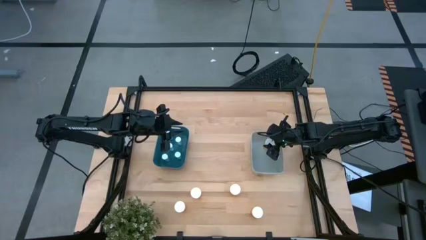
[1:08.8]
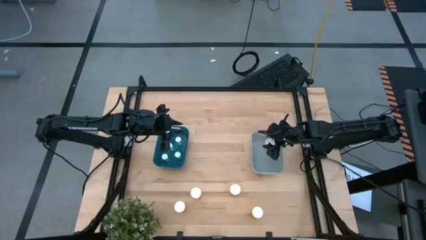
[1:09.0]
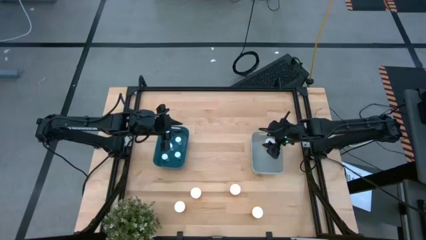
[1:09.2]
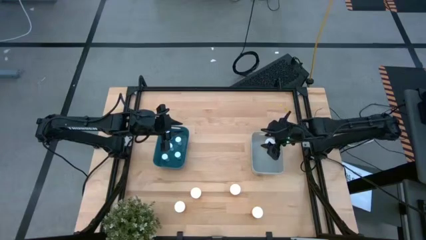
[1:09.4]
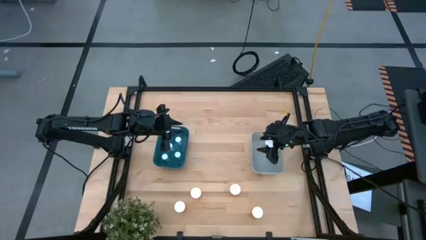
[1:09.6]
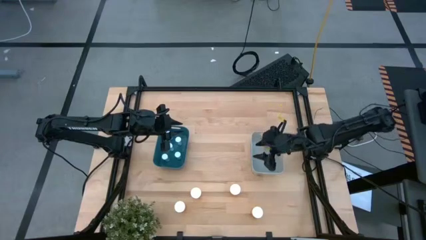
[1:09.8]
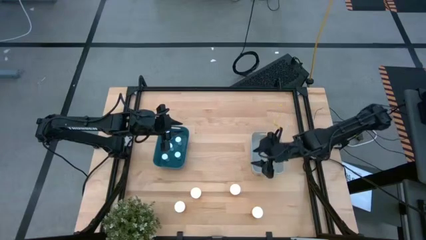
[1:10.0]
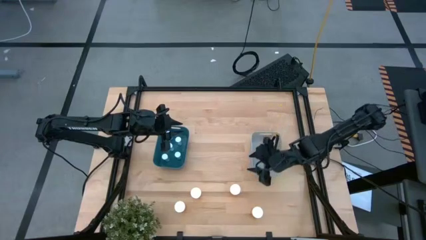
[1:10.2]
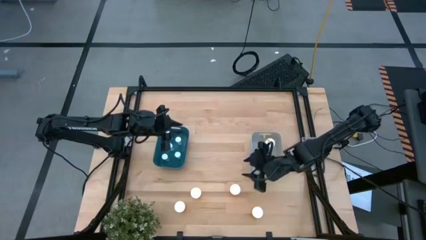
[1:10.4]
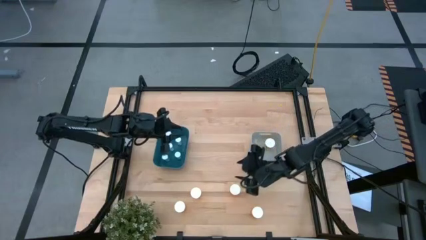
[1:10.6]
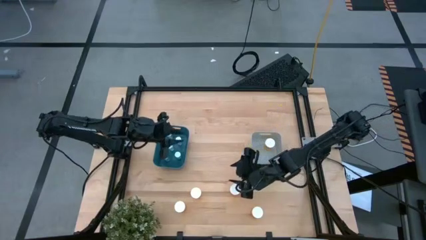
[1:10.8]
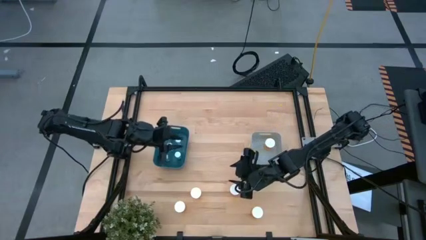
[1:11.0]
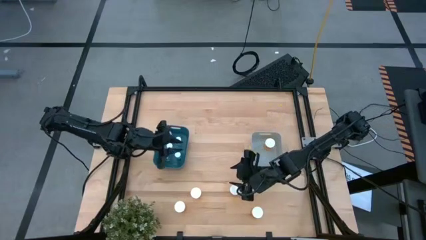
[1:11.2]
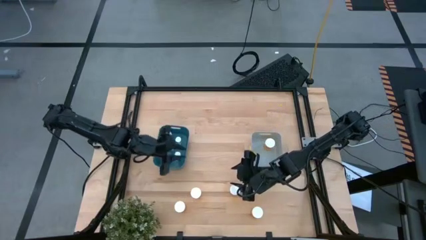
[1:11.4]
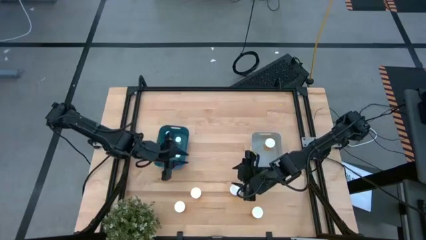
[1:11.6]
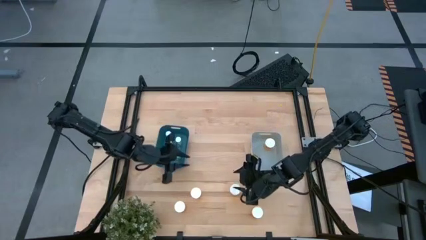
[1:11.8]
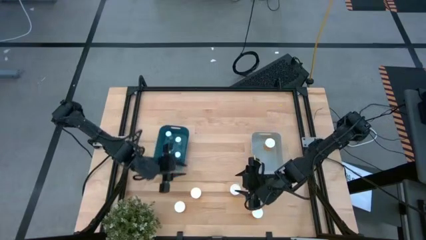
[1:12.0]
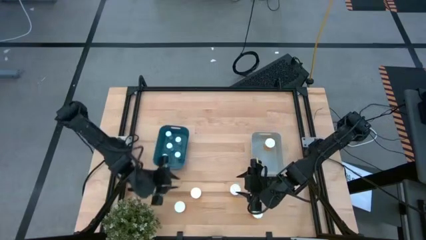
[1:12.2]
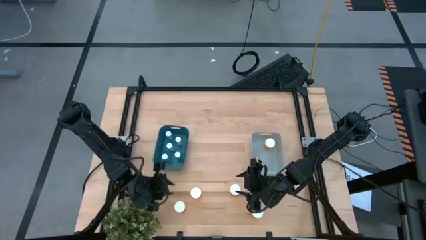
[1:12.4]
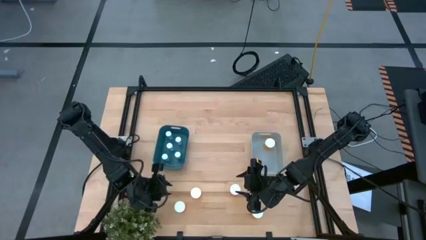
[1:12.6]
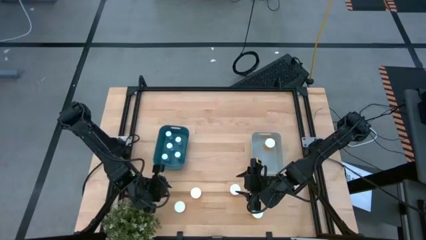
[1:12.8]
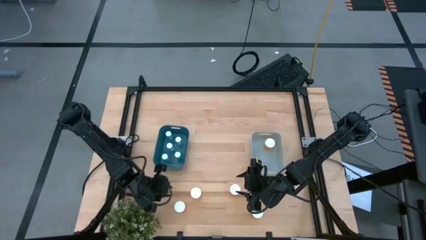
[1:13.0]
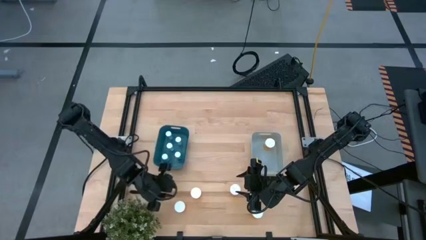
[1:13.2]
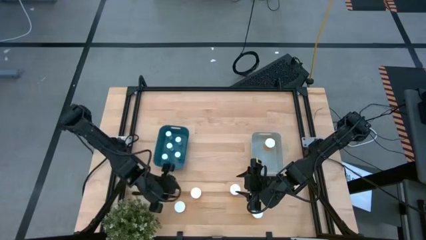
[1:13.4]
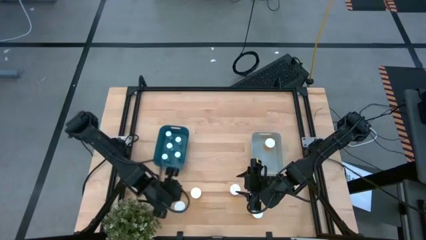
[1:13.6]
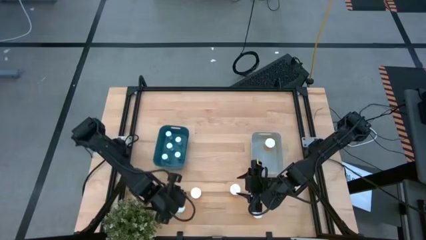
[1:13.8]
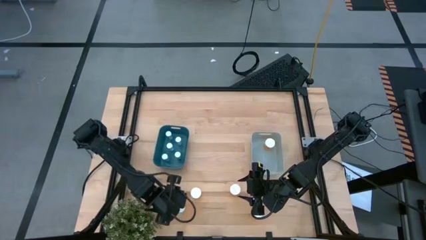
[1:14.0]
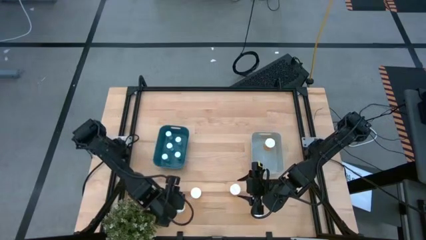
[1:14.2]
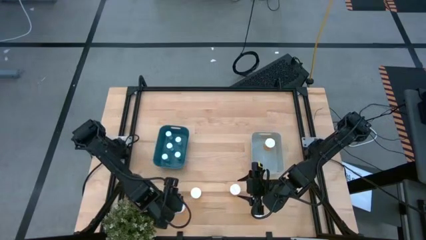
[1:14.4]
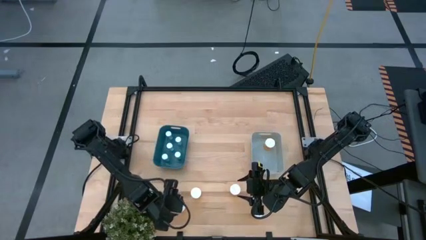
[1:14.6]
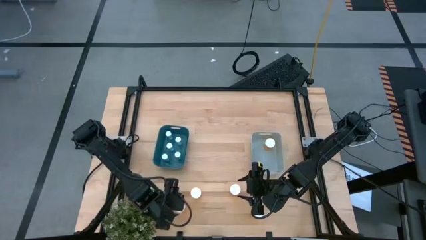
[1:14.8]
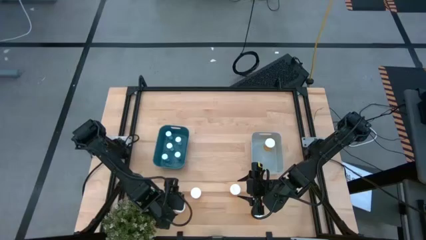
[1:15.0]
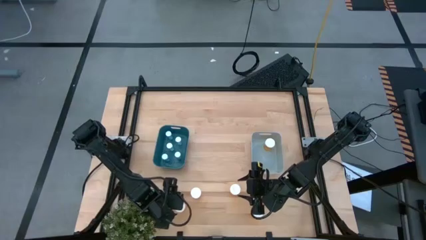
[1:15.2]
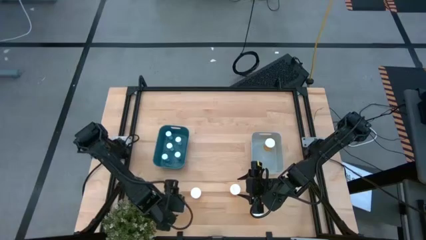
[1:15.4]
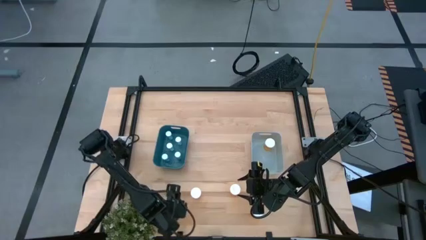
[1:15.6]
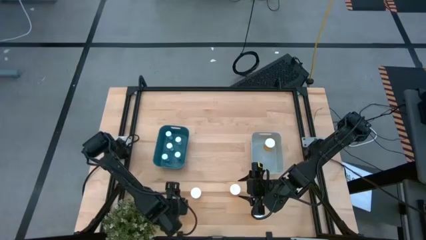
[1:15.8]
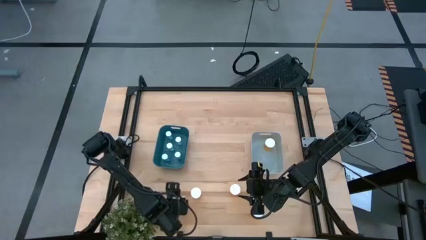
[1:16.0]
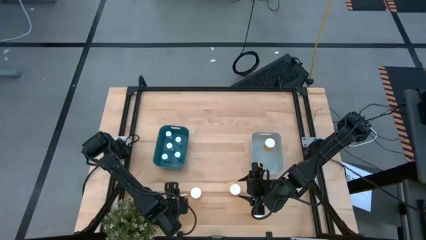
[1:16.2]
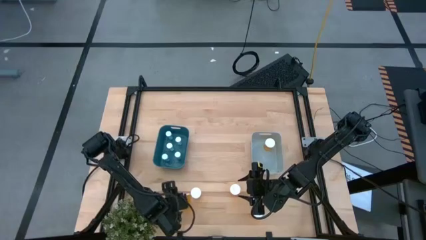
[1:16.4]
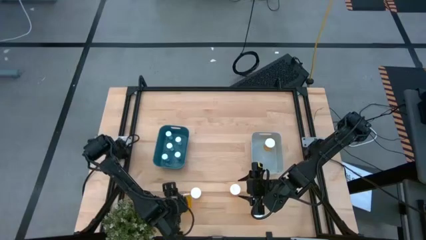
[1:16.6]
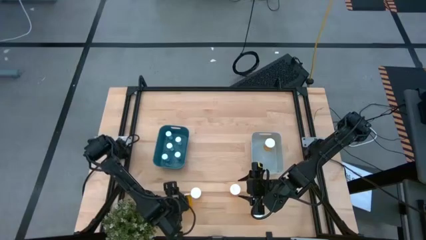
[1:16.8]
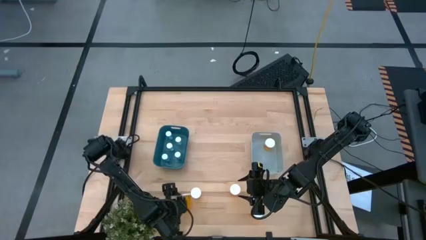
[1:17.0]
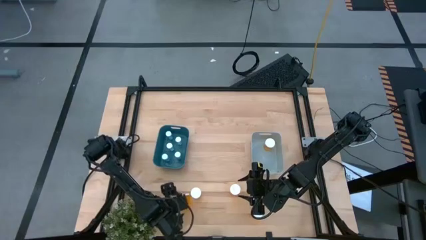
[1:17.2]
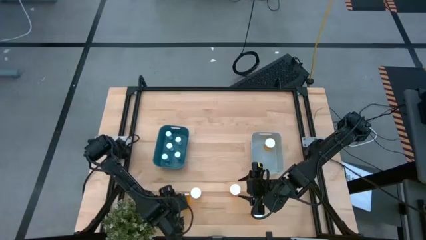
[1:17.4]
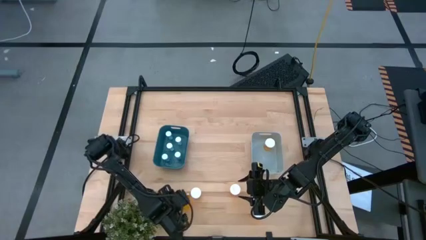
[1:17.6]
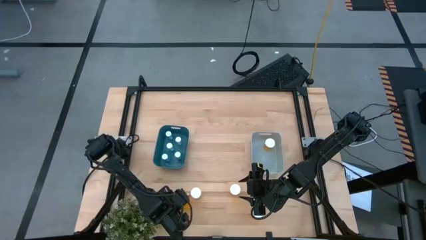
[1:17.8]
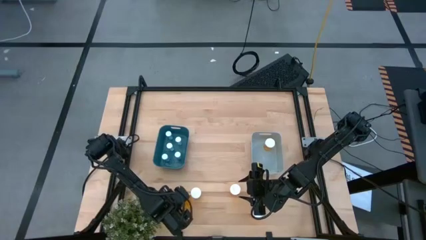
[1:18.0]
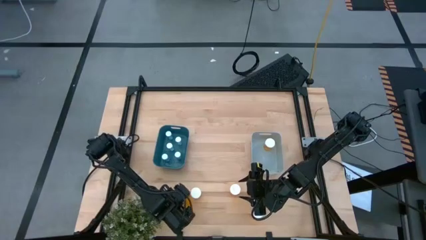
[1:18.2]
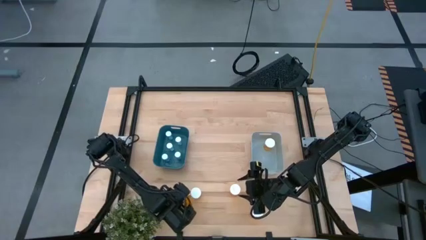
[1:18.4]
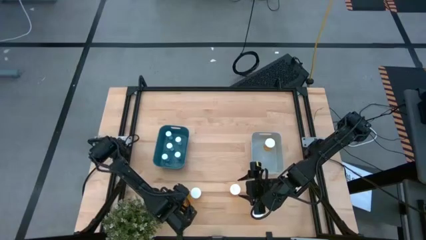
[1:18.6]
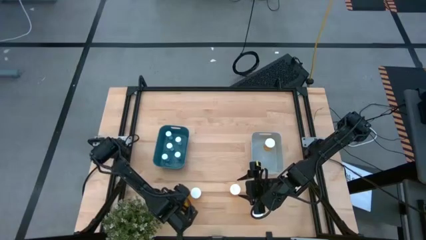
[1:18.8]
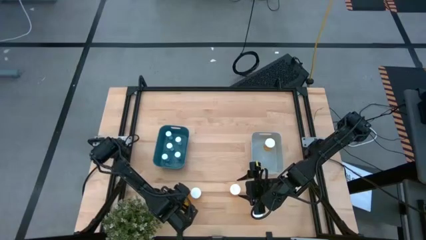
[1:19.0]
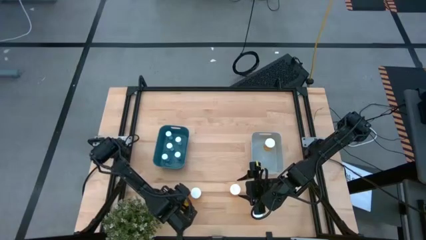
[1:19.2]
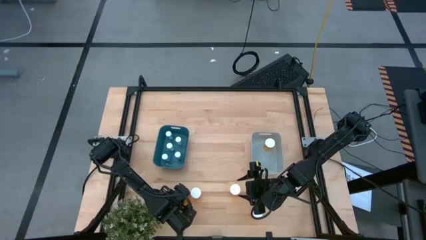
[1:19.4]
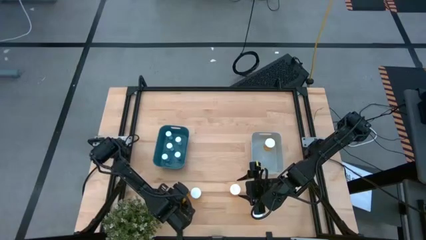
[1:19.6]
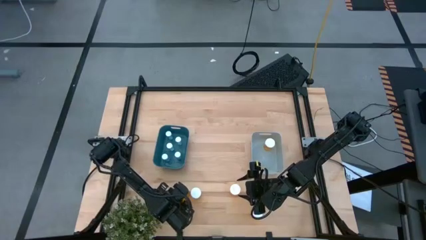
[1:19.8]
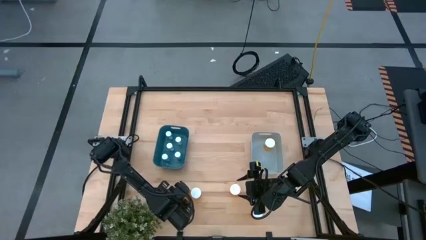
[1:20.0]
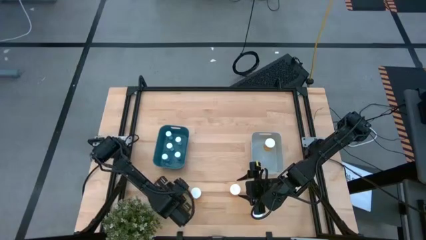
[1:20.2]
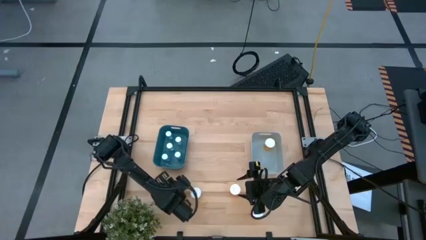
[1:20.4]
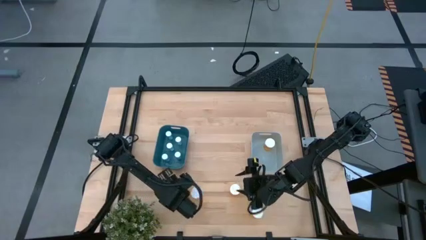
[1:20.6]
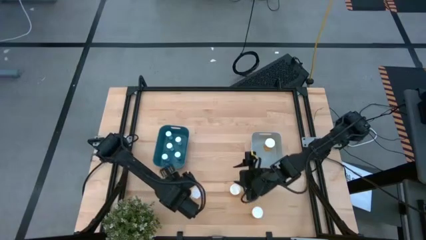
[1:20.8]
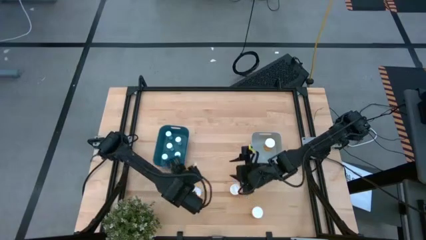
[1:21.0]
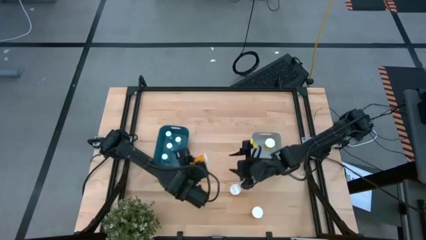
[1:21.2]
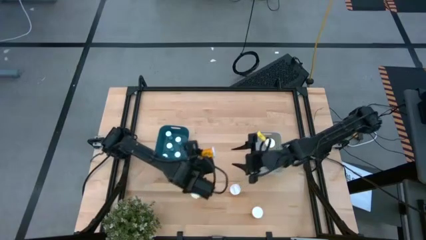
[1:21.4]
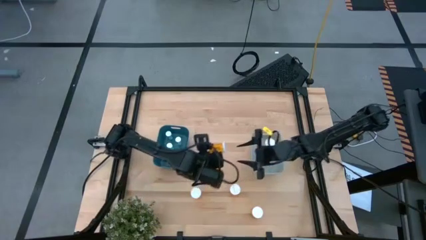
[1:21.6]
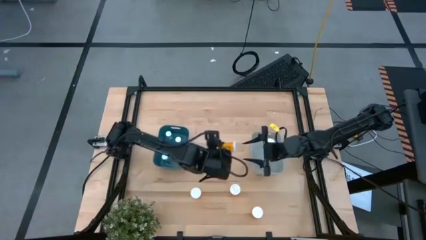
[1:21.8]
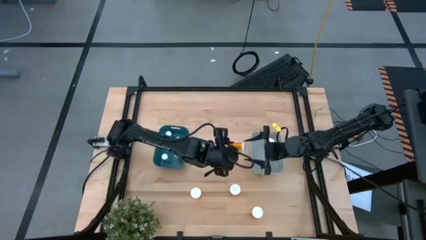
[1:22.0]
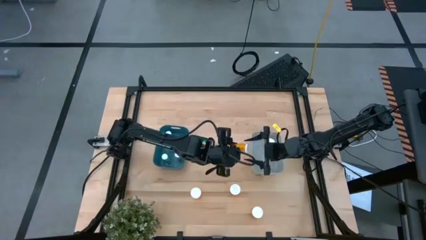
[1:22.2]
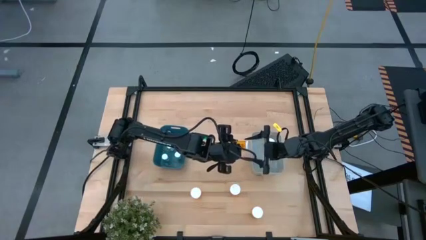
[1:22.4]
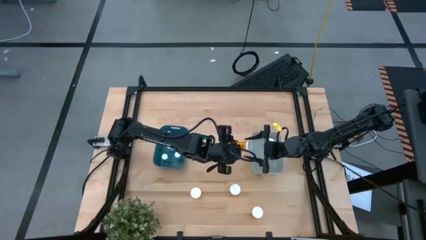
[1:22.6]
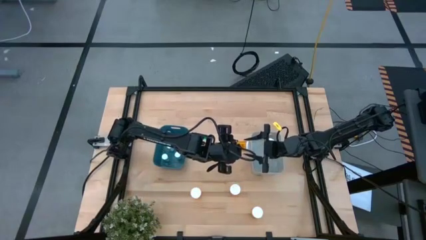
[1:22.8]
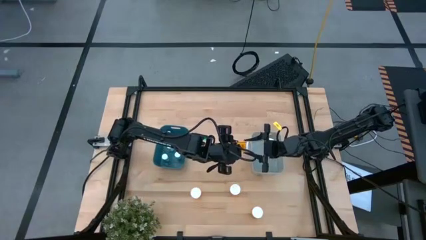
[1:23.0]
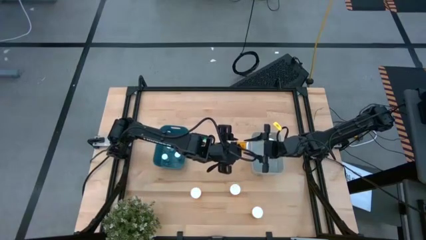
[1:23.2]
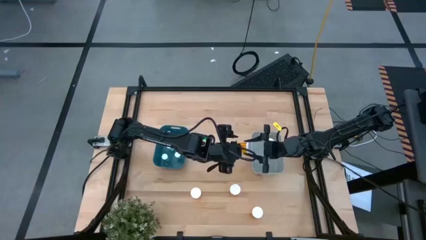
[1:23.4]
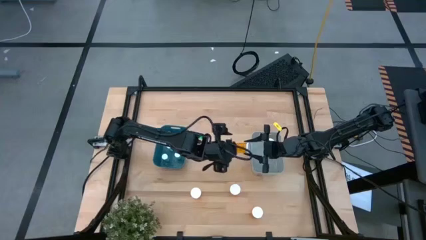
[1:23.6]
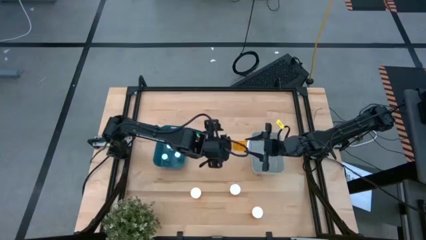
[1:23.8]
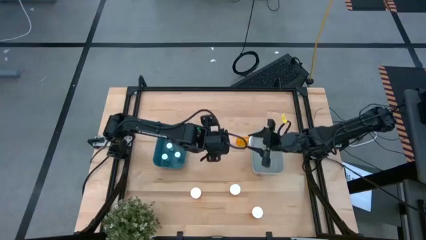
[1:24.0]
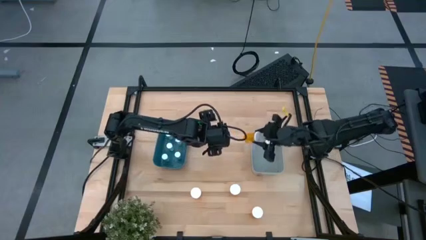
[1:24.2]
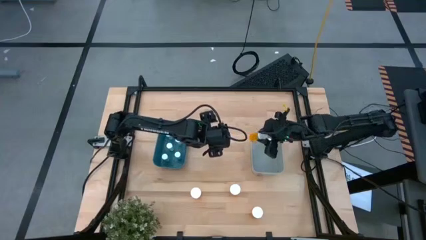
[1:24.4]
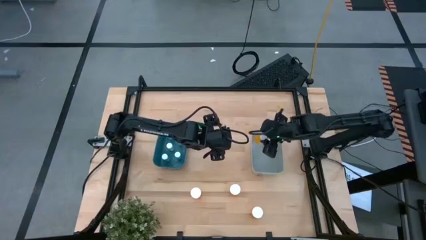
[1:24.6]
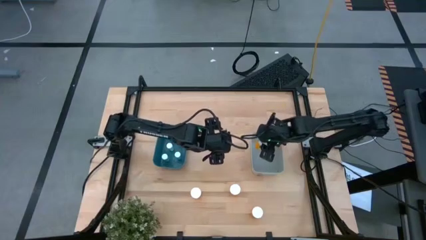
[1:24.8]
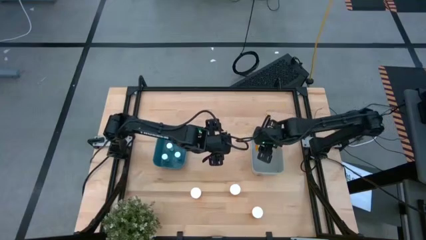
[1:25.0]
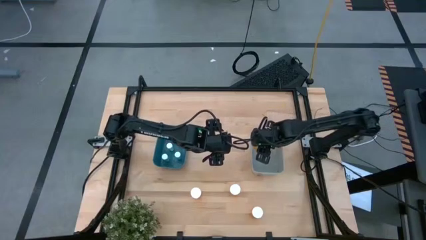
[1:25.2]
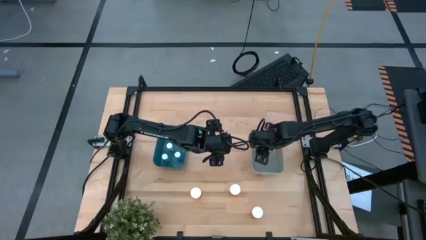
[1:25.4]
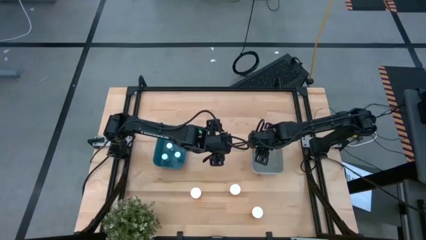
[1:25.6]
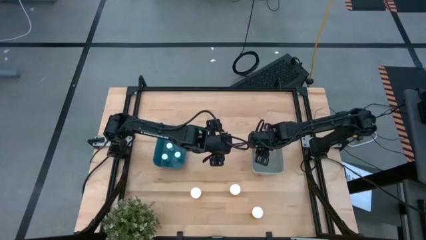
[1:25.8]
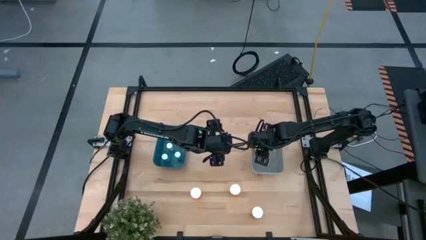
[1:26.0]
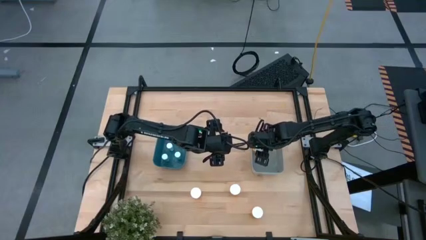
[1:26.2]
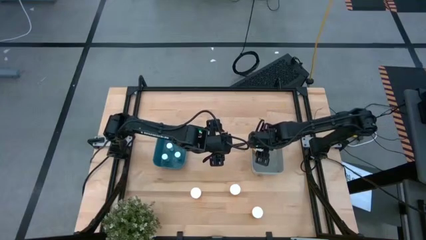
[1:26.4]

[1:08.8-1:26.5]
Task: Pick and place medicine bottles into bin by pill shape (circle, oval)
Put the orange pill bottle into the gray bin
